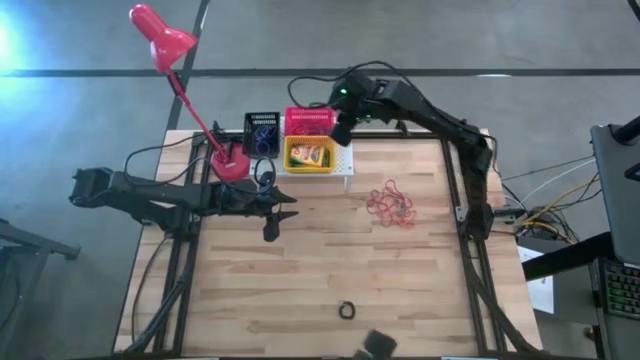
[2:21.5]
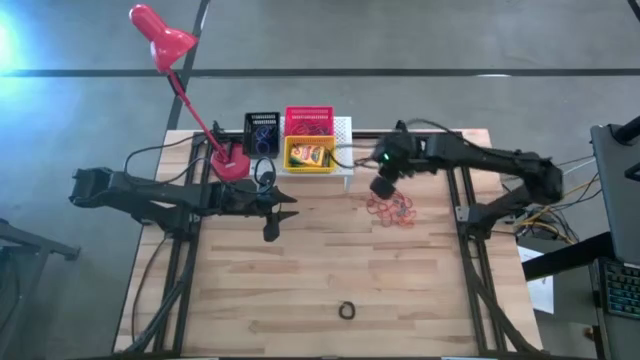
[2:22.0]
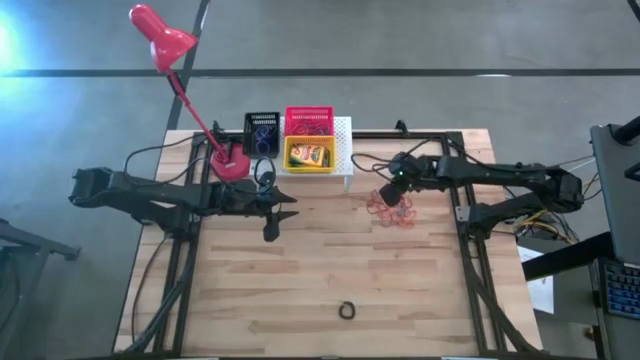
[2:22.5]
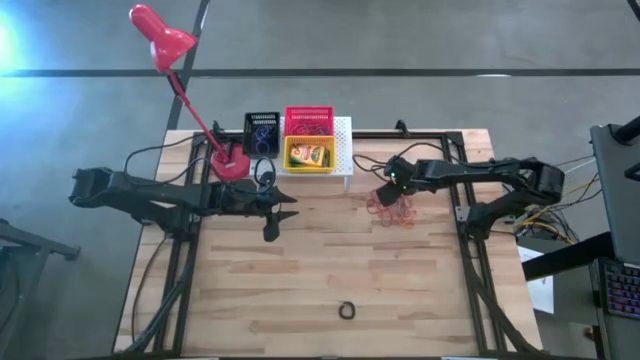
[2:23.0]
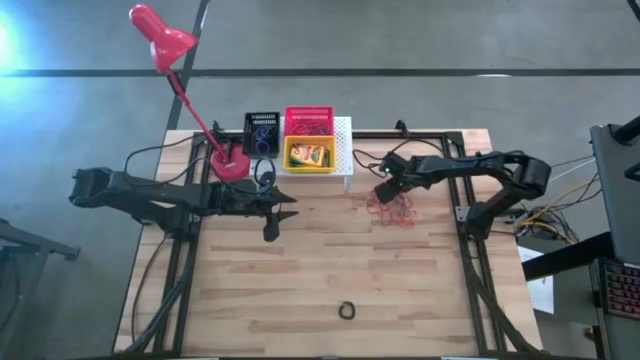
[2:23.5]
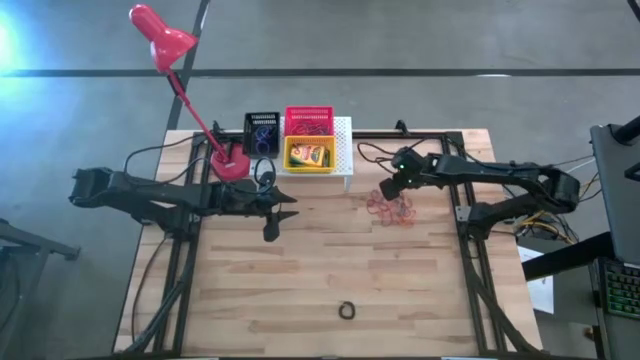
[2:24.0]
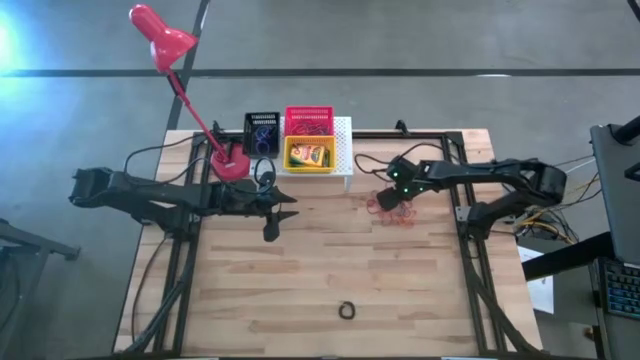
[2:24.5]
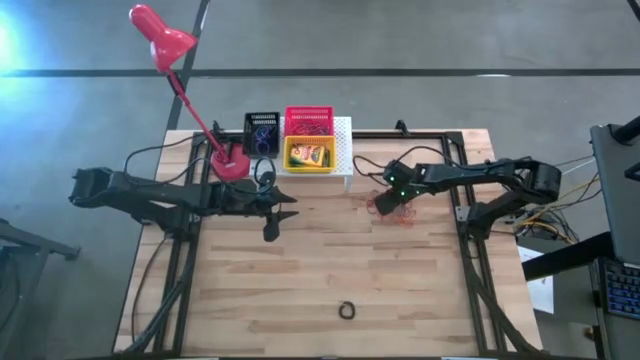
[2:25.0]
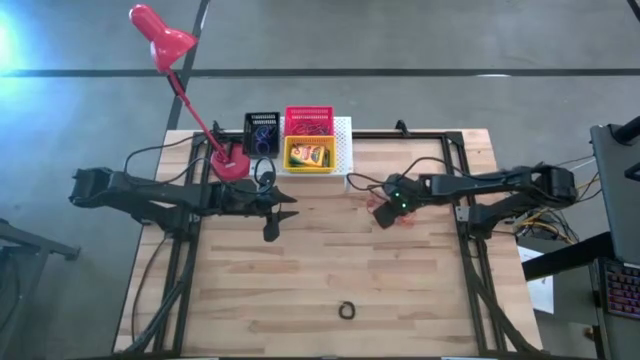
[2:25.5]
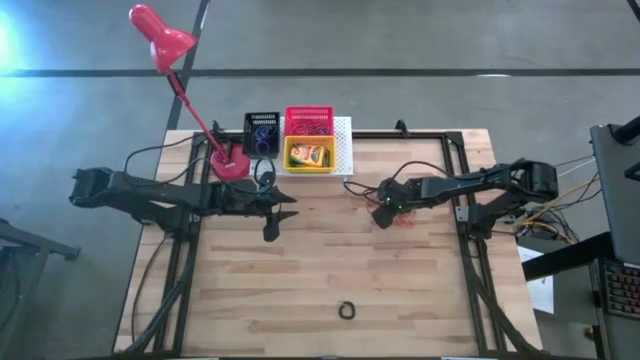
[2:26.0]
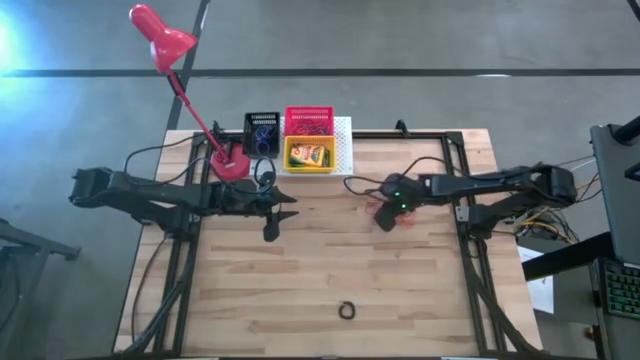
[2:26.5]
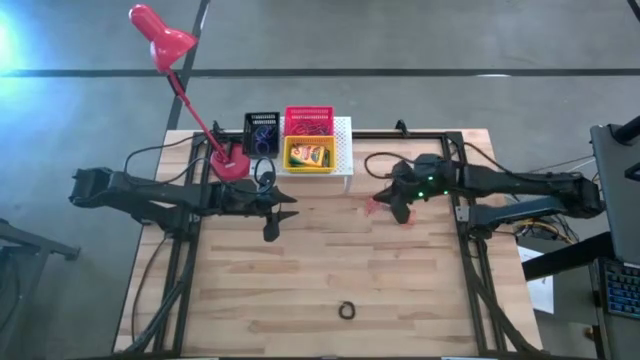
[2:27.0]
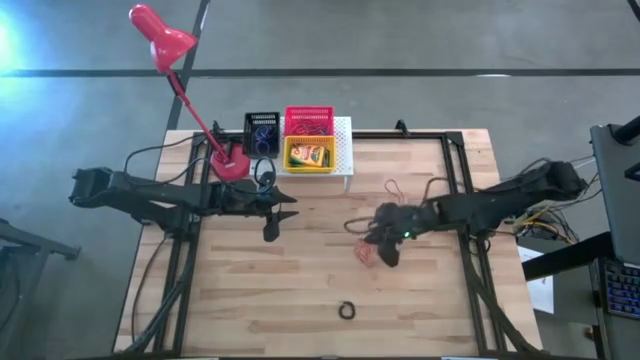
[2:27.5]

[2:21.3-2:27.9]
Task: Pick & Place Office Desk Supplies
Put the red rubber band into the red bin on the shelf

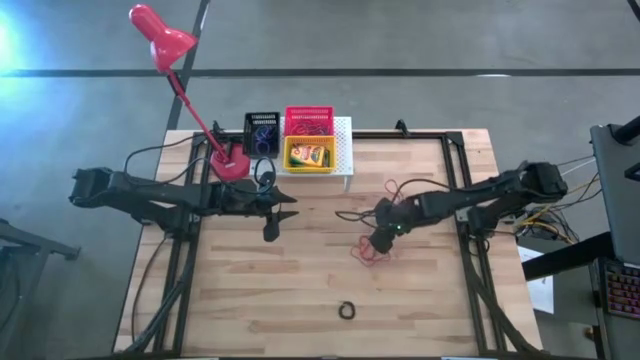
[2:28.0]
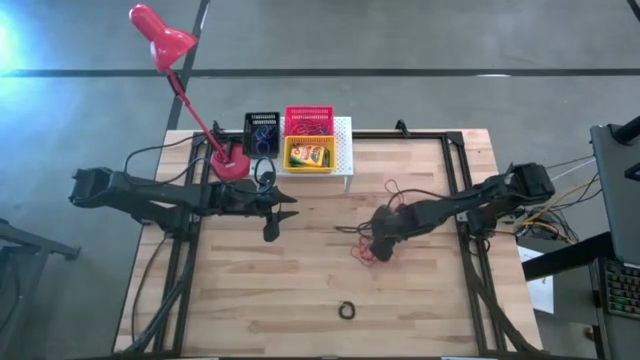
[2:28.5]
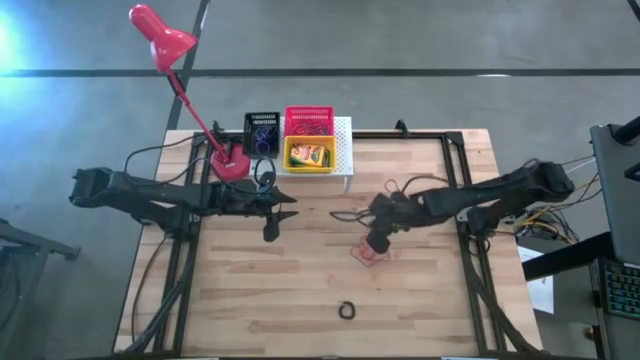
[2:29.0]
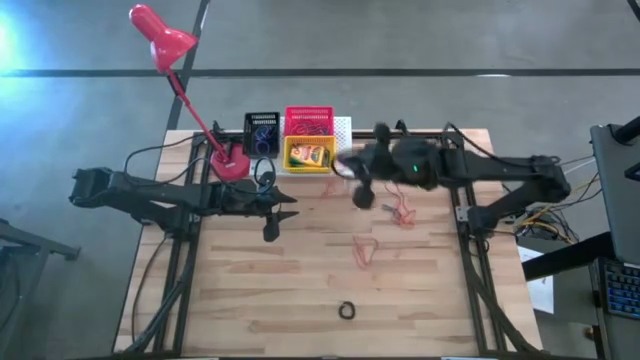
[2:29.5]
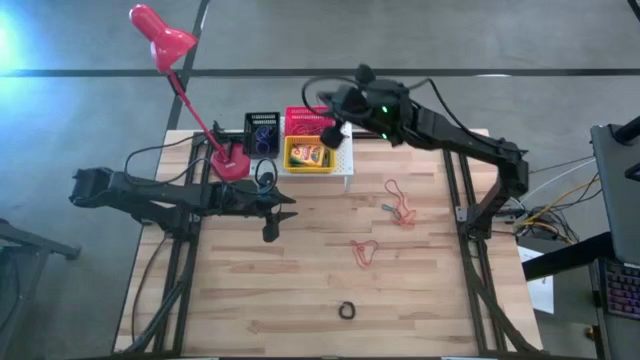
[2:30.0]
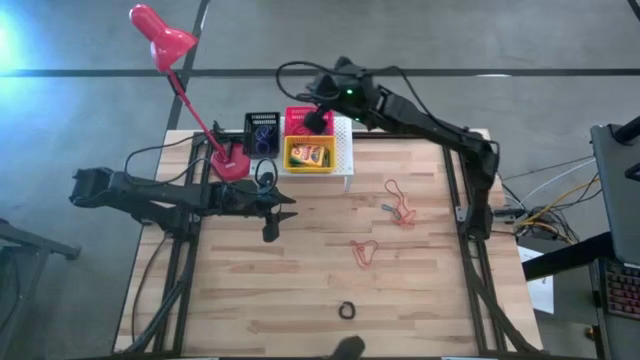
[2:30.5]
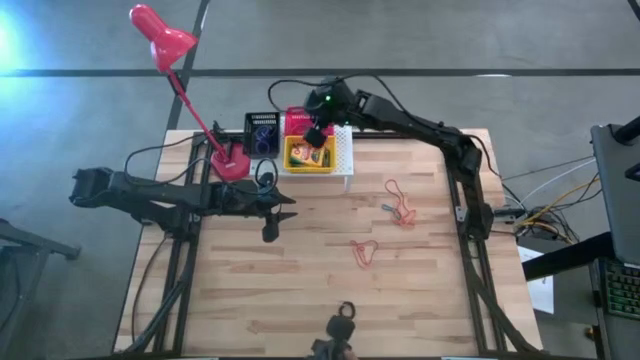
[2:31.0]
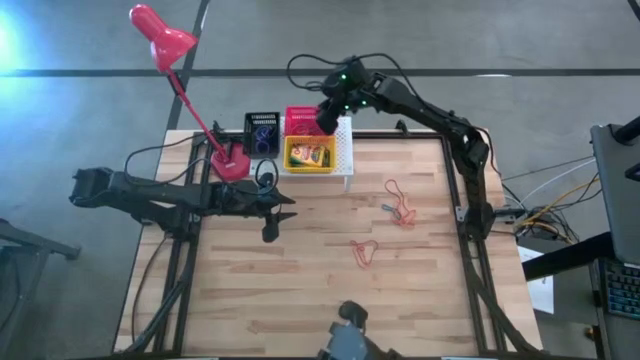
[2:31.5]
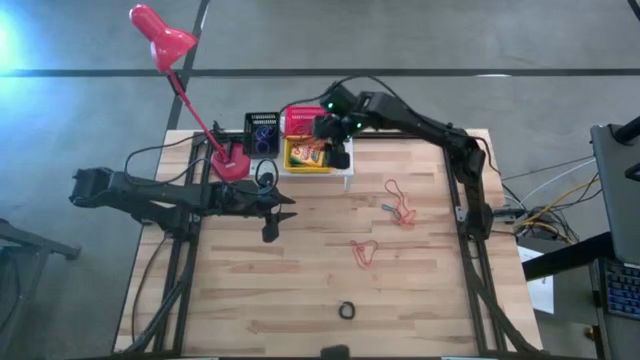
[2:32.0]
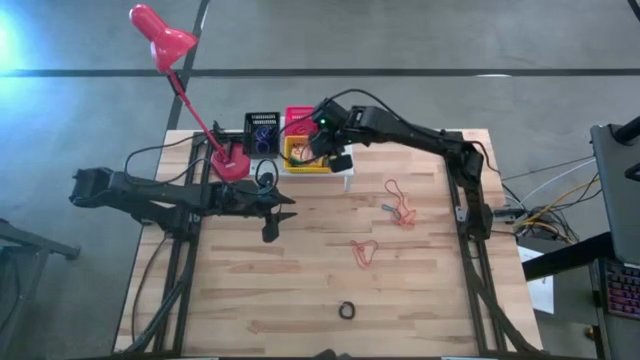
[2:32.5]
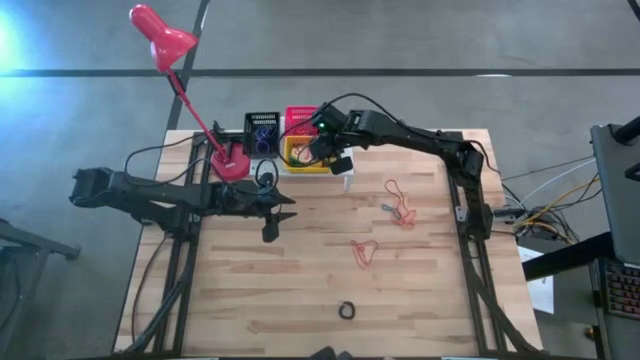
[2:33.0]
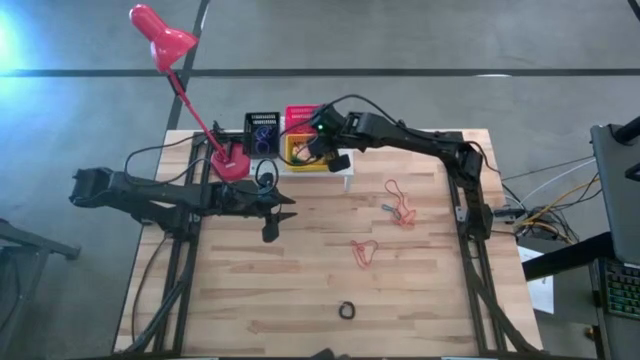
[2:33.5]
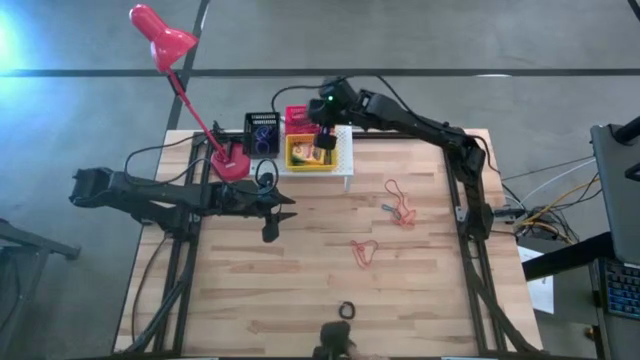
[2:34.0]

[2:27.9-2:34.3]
Put the red rubber band into the red bin on the shelf

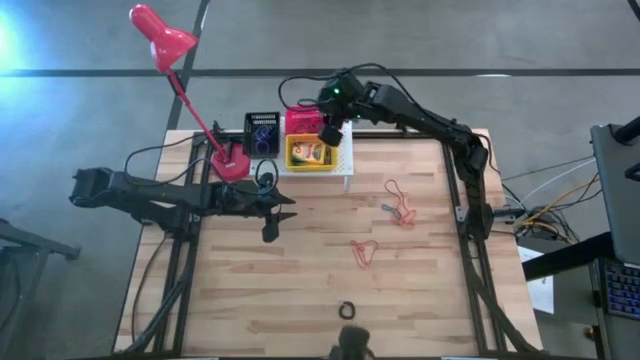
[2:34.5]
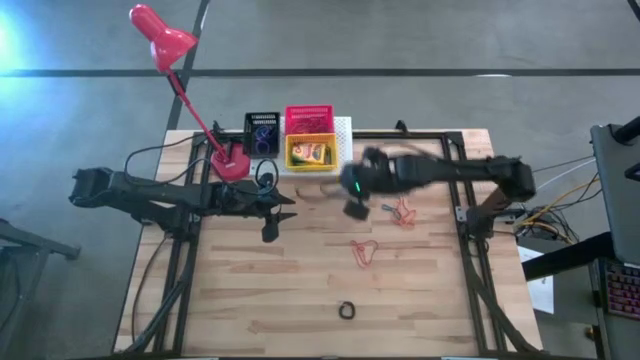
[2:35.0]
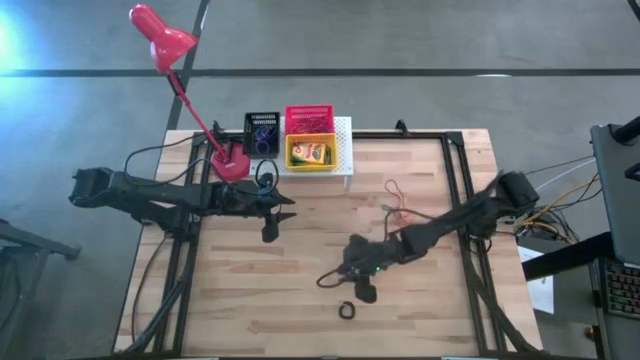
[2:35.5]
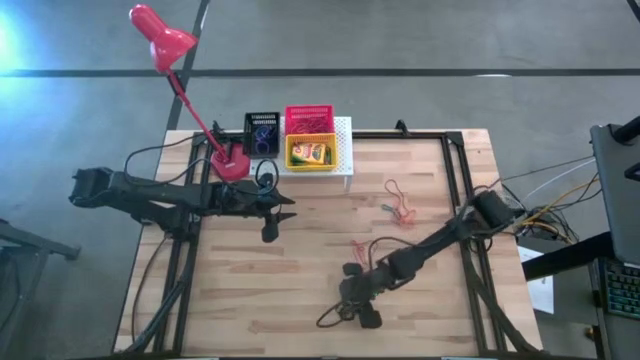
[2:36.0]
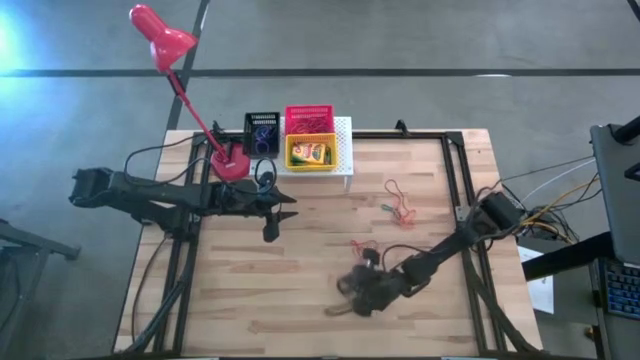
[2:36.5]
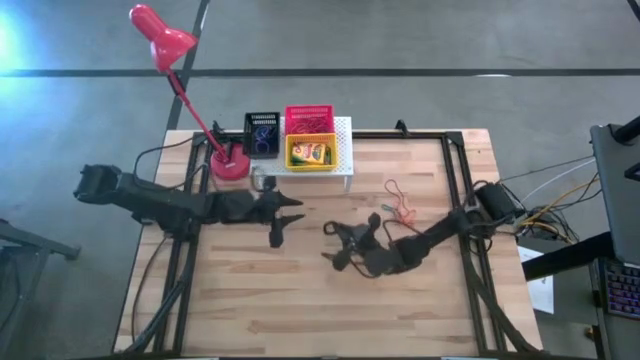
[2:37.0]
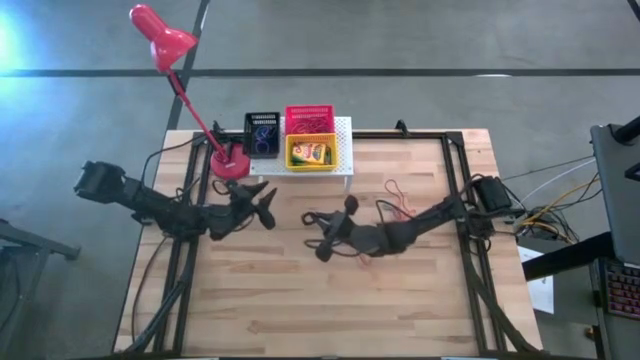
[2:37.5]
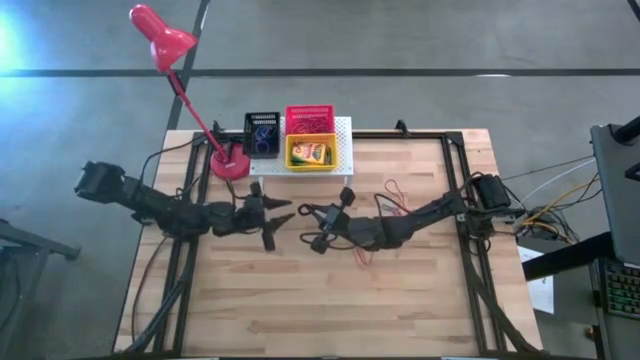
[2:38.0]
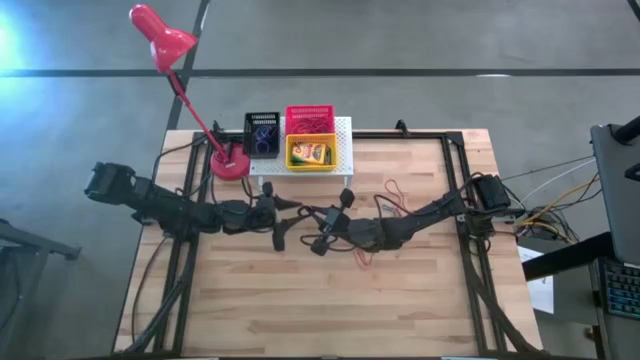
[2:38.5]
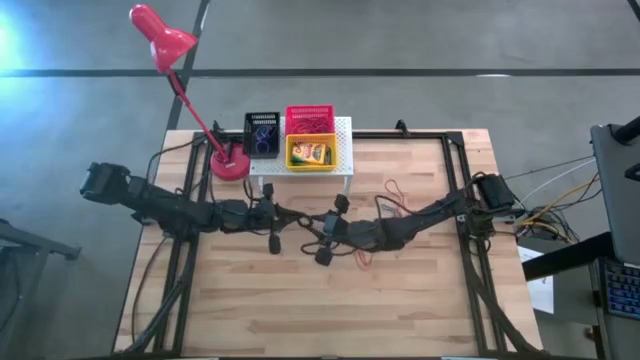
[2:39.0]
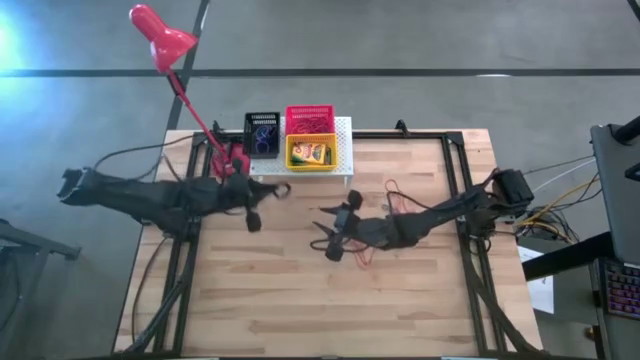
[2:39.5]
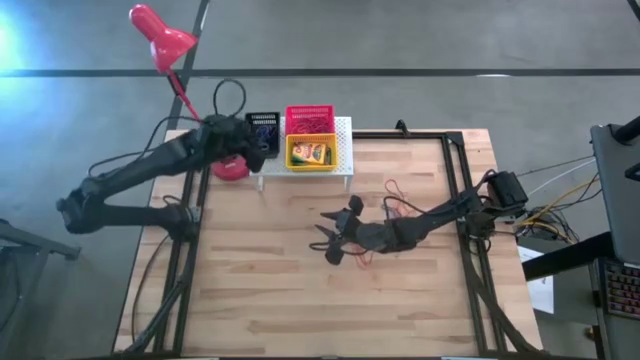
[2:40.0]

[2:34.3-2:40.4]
Put the black spring keychain into the black bin on the shelf

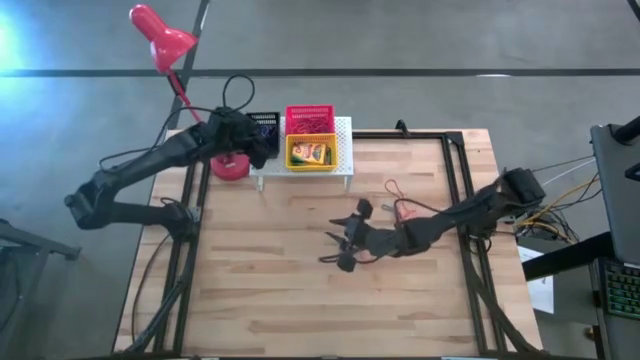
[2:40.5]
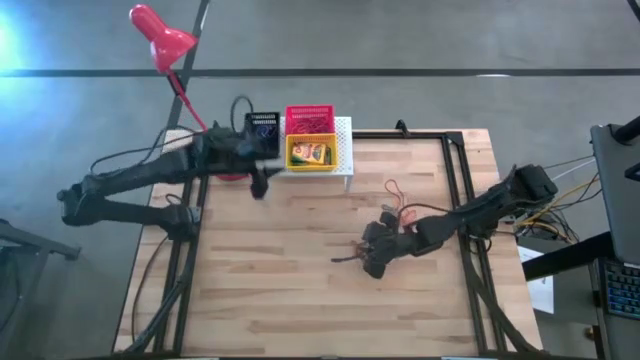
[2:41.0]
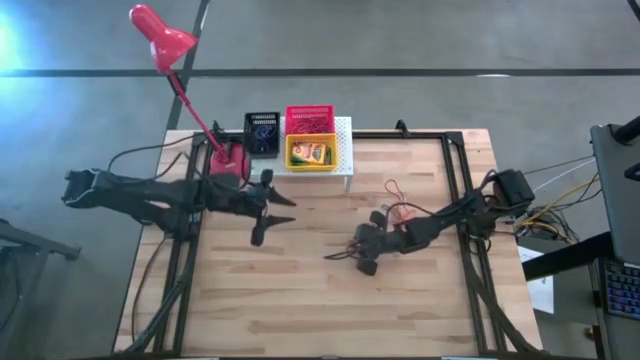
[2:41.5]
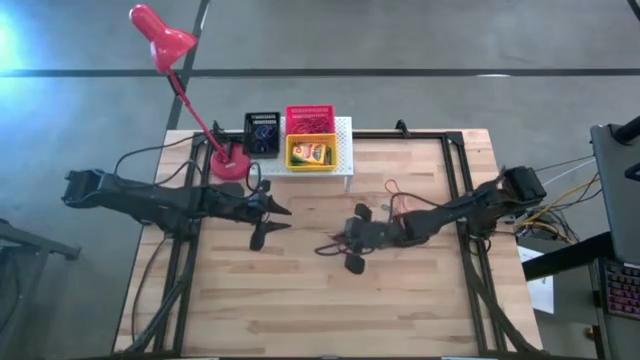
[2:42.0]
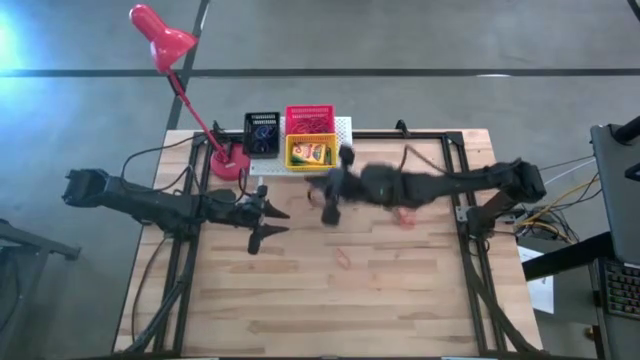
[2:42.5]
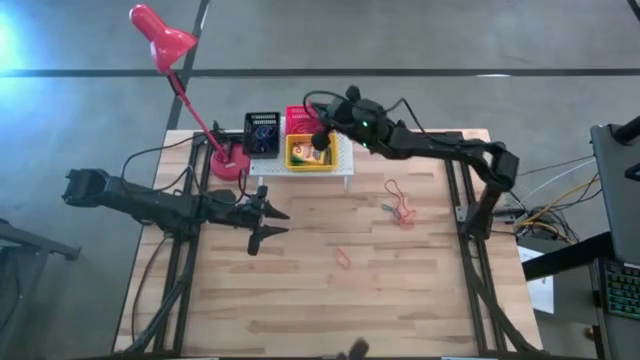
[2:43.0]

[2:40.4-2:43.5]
Put the red rubber band into the red bin on the shelf
